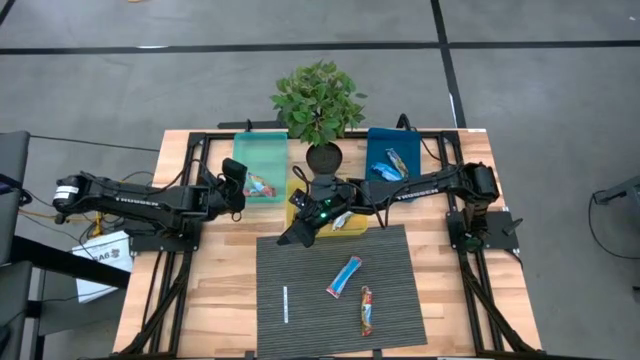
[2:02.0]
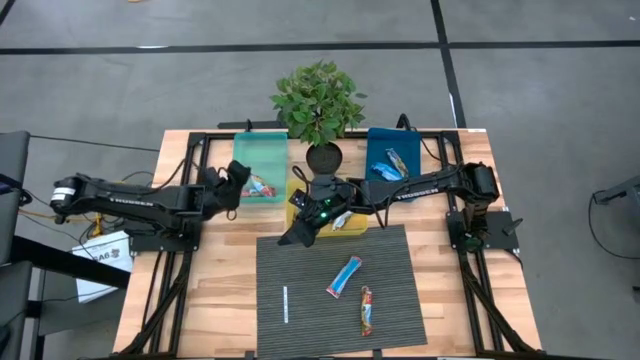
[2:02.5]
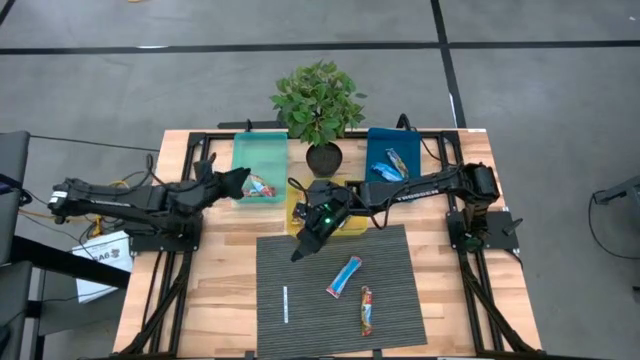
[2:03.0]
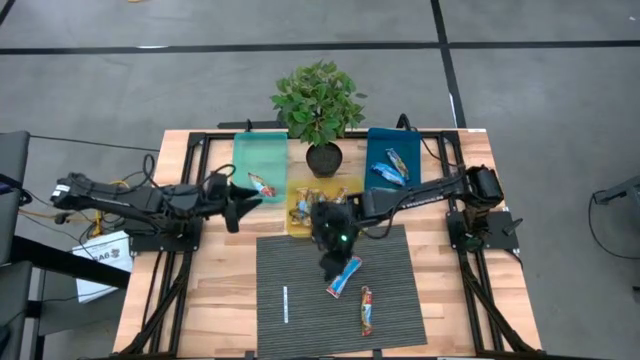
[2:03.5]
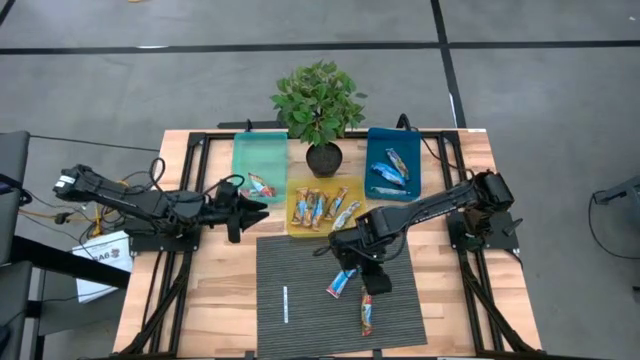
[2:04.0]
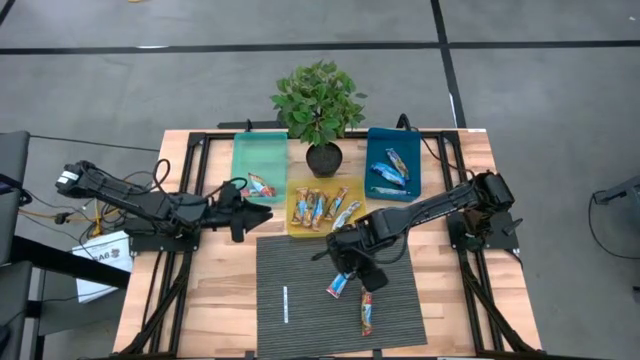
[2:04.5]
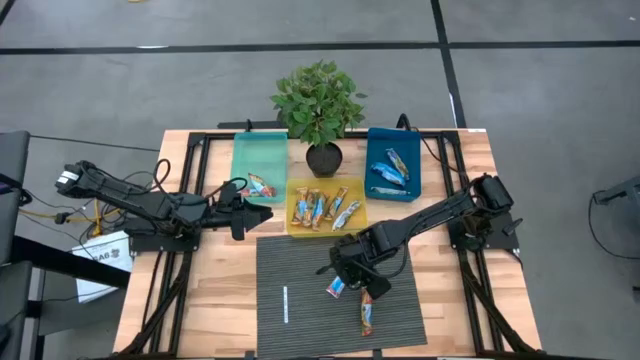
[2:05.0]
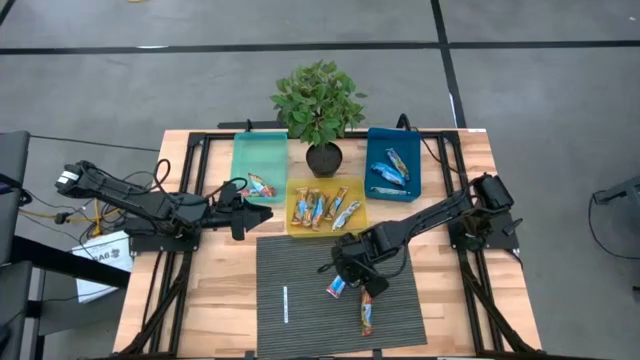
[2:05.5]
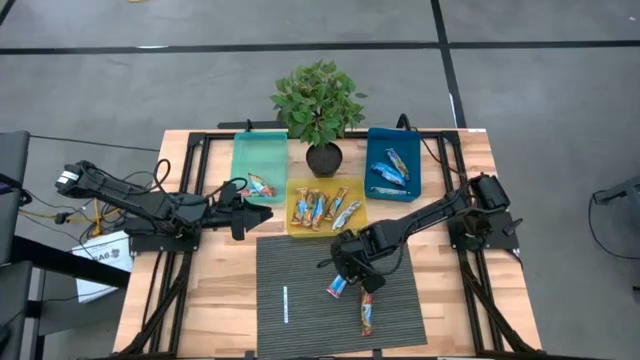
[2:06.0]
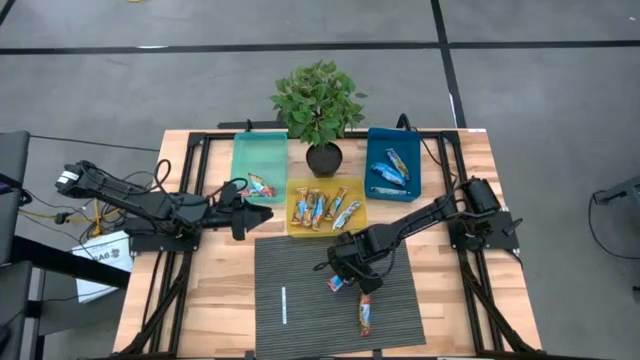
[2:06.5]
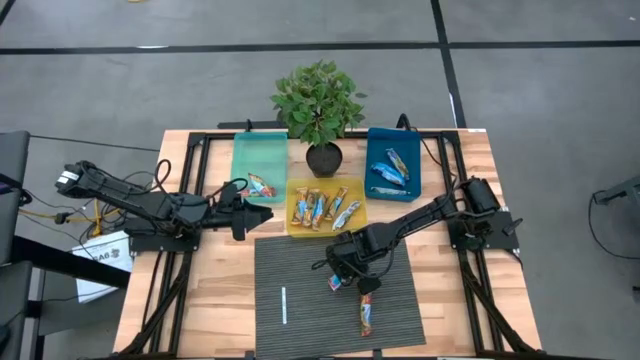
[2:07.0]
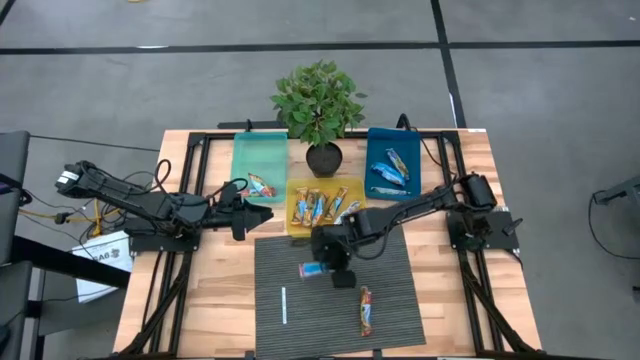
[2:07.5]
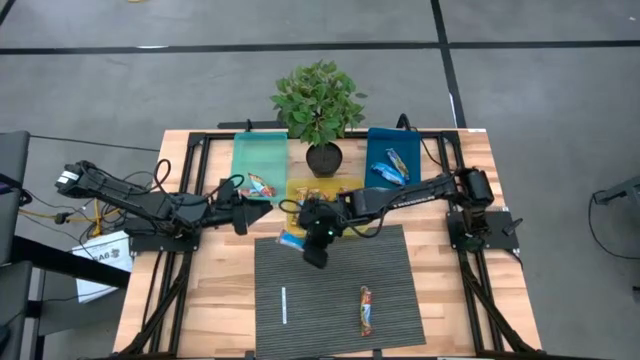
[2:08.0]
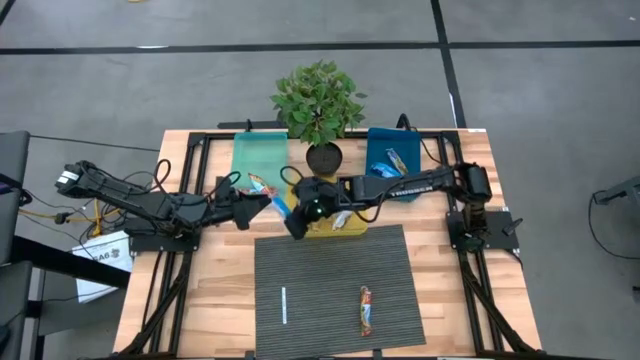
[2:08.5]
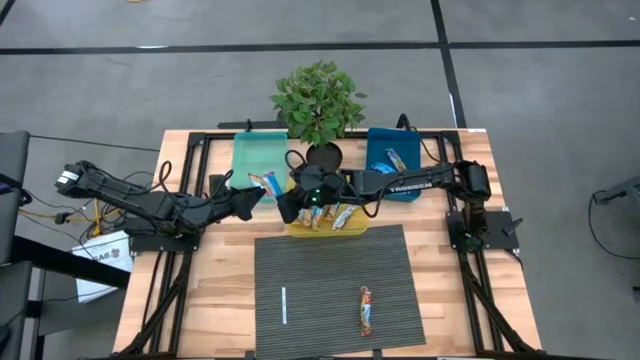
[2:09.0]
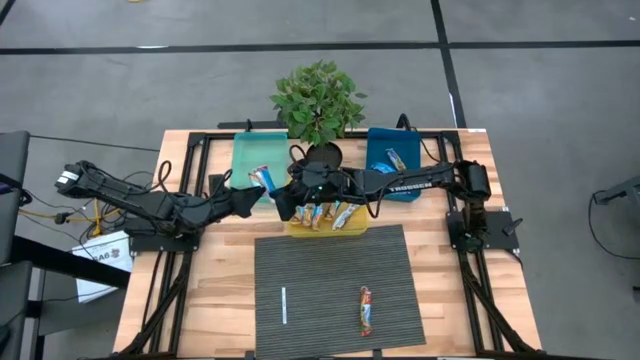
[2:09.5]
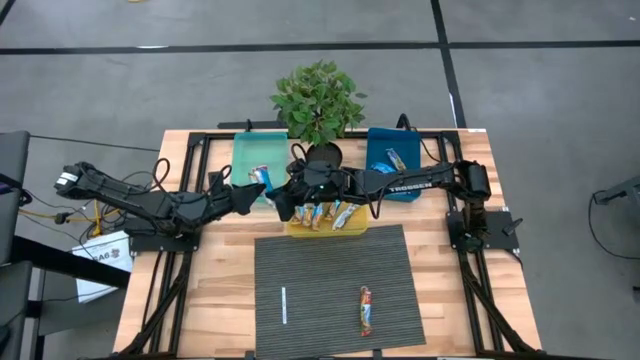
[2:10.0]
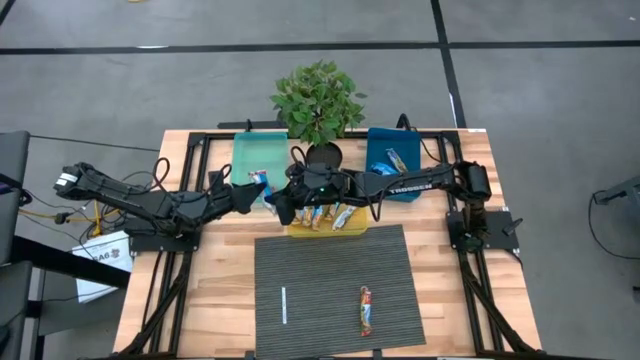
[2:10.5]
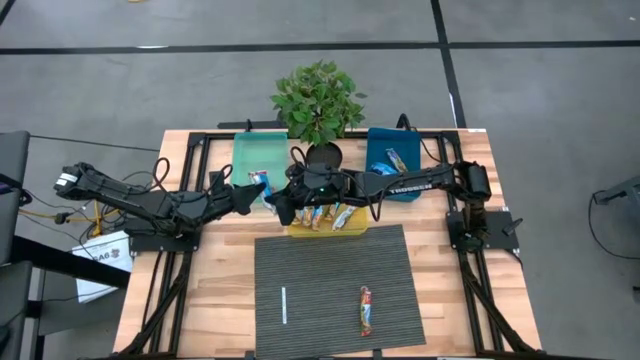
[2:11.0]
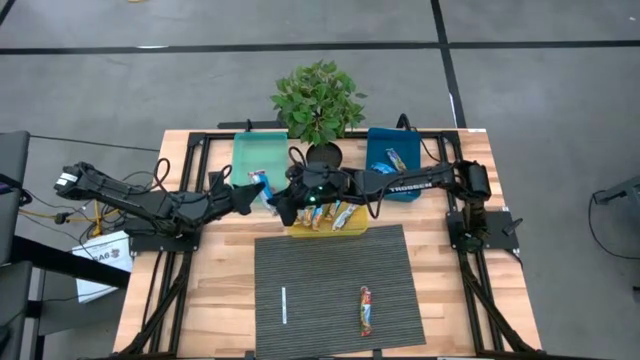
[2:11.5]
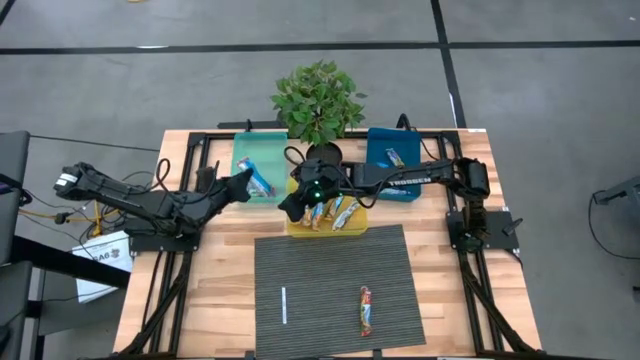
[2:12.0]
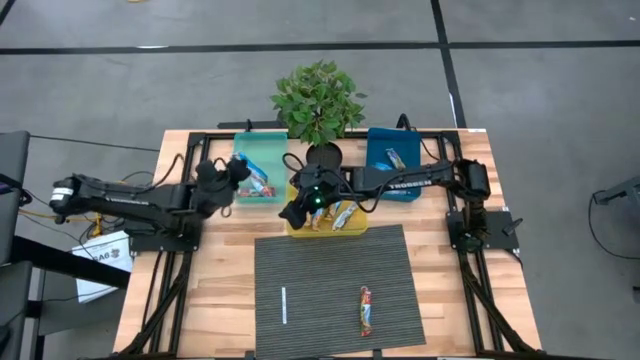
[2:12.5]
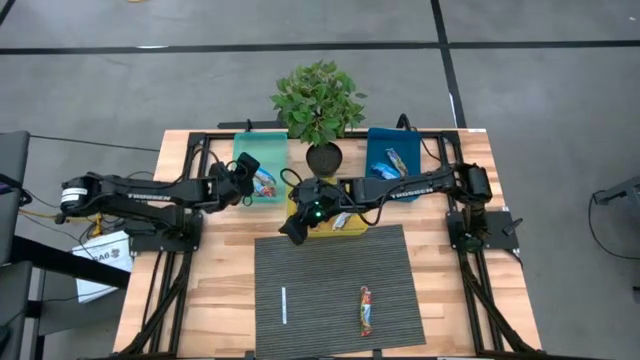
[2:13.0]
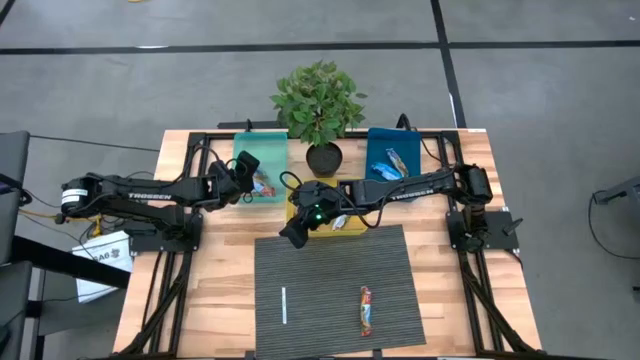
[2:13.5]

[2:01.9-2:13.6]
Task: Pick and place Granola Bars by type
Put the red granola bar into the green bin

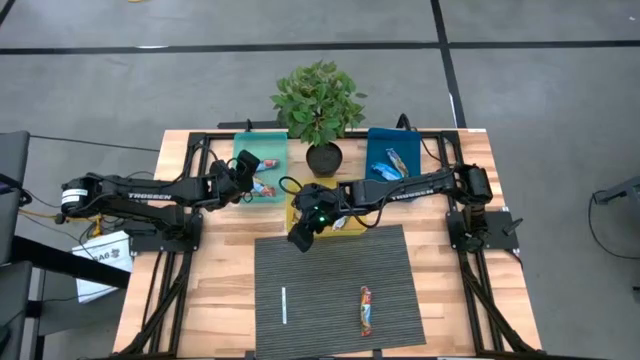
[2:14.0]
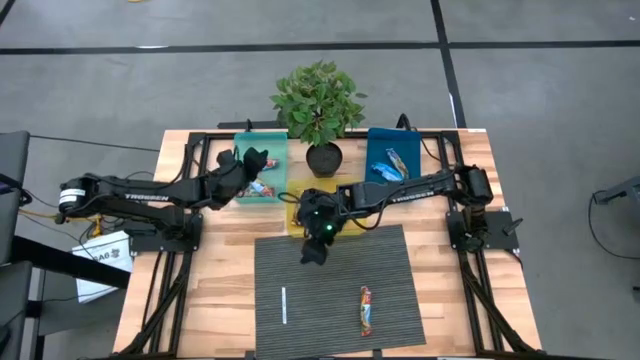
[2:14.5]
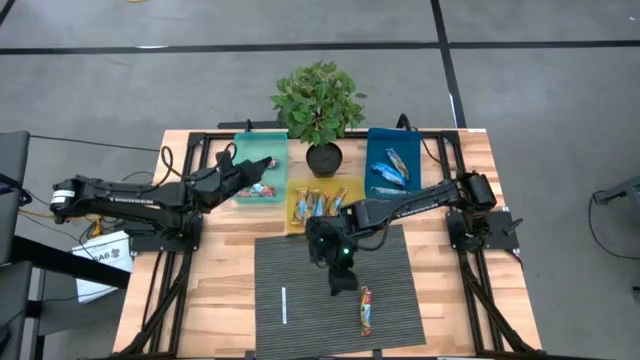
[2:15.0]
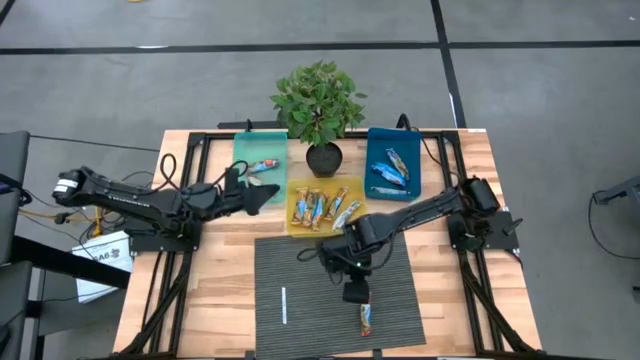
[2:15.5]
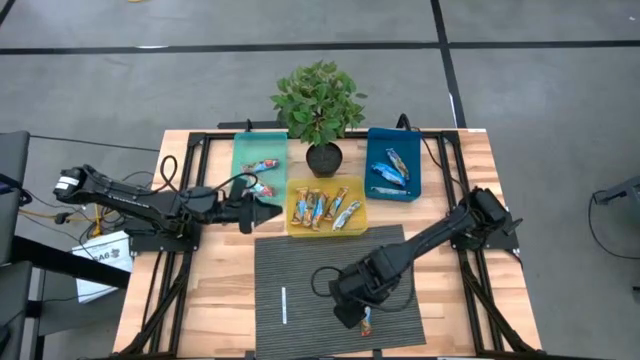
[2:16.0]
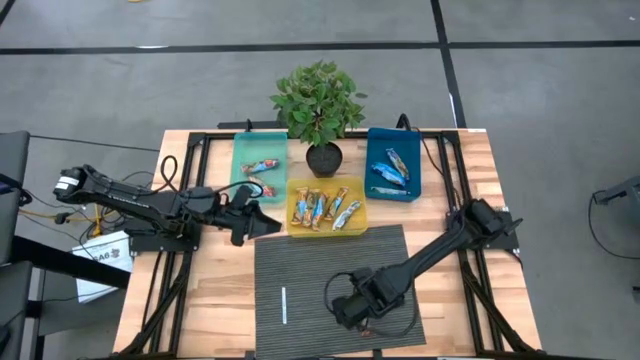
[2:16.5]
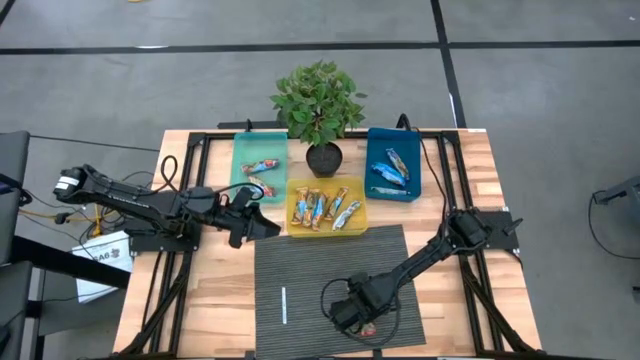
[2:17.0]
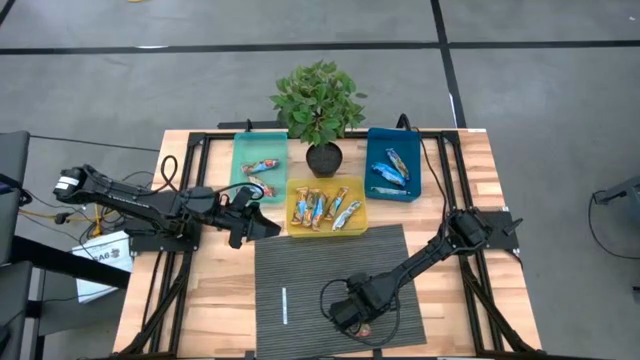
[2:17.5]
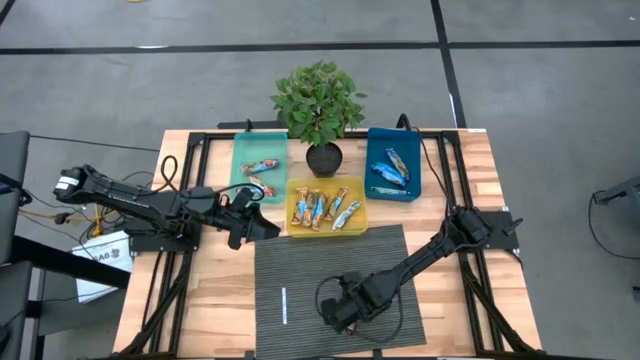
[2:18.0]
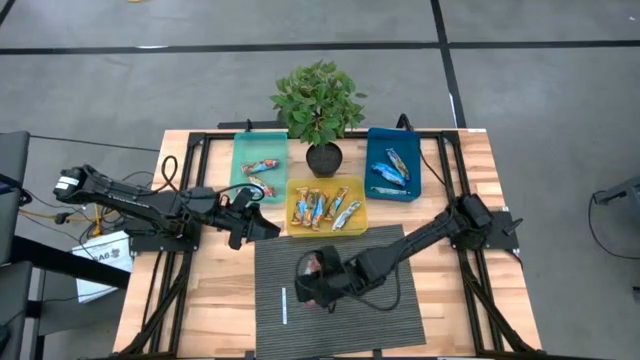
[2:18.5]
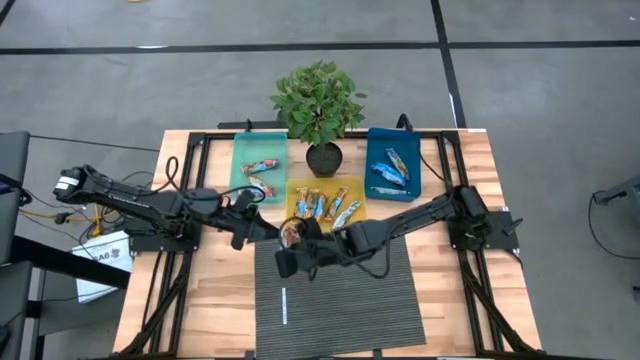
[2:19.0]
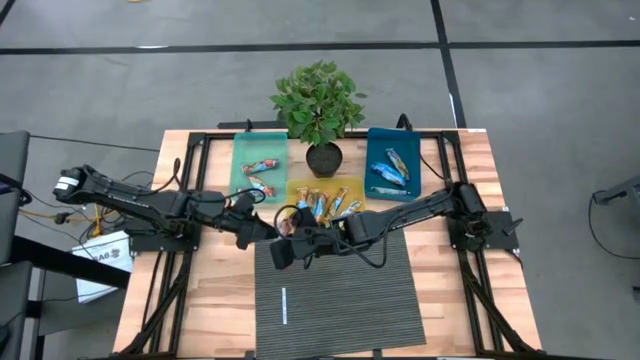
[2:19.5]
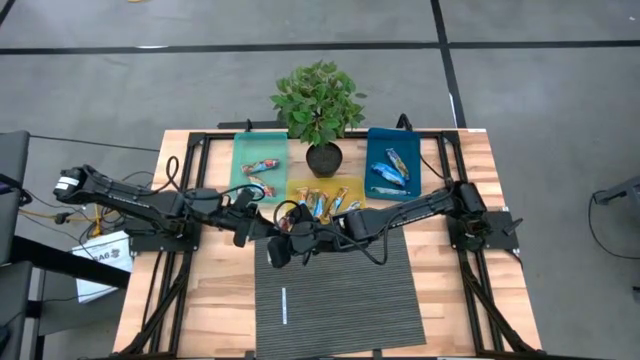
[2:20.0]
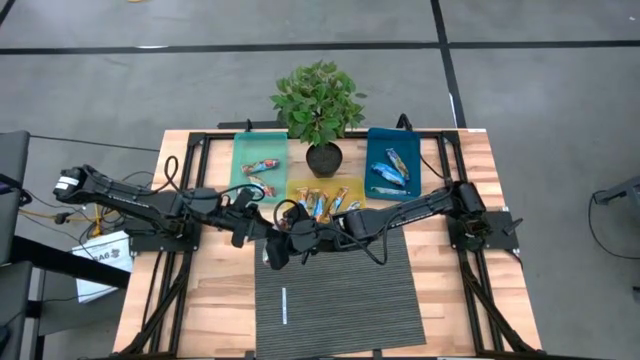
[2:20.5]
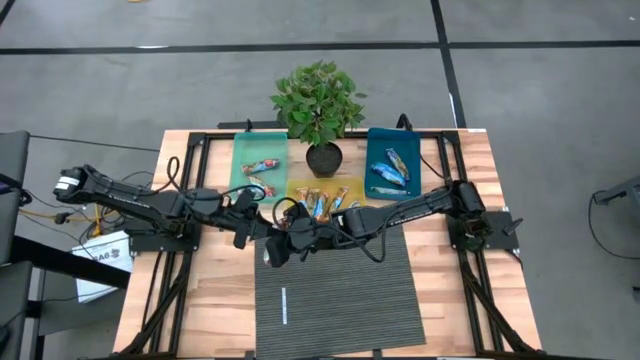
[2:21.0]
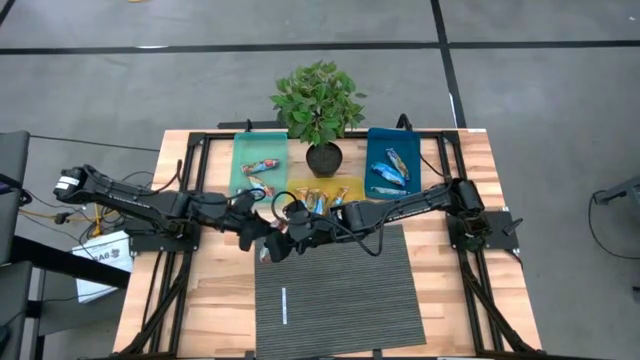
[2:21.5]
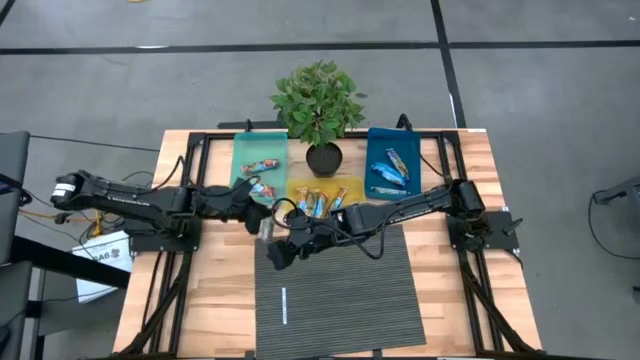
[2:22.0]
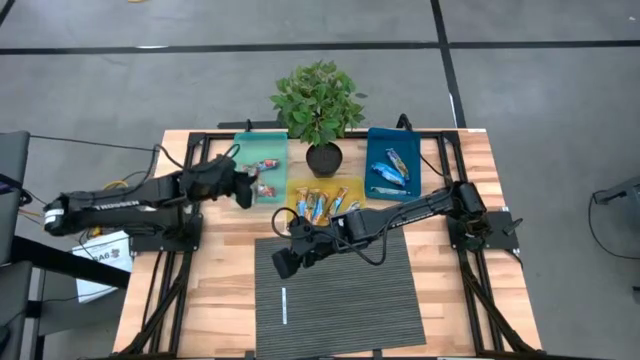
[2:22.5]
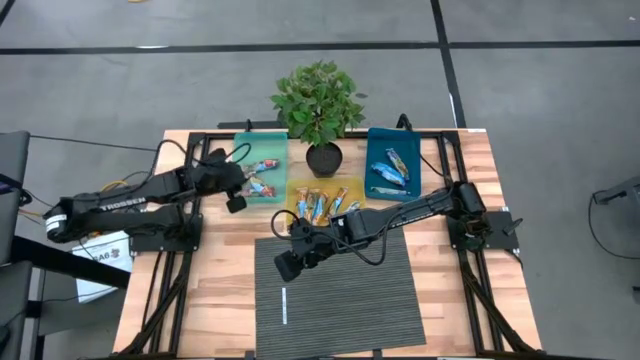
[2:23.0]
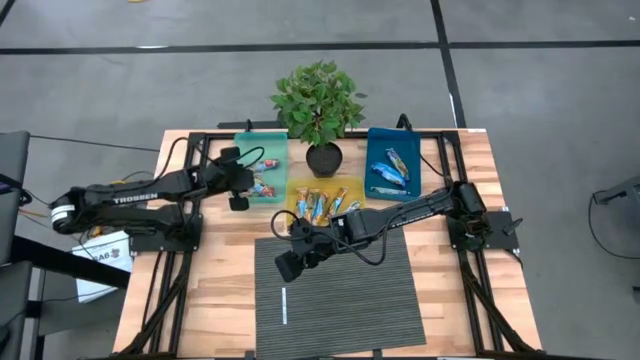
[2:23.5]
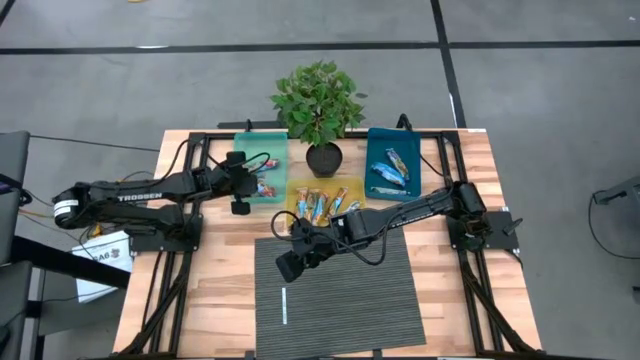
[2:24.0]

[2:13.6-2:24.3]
Put the red granola bar into the green bin
